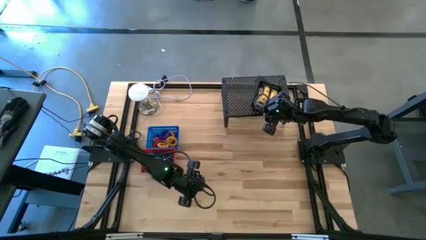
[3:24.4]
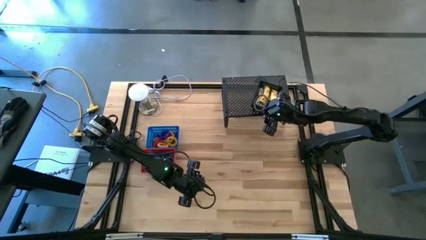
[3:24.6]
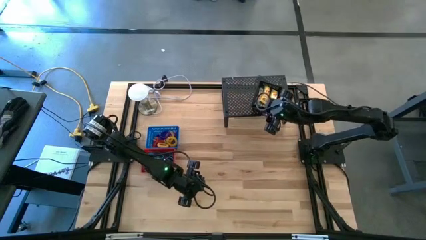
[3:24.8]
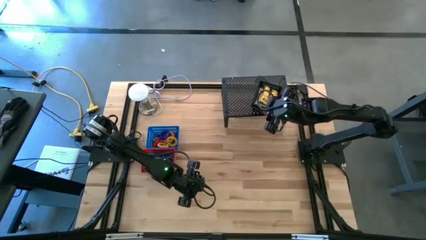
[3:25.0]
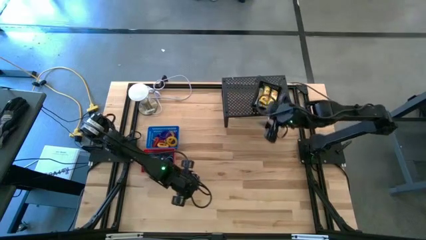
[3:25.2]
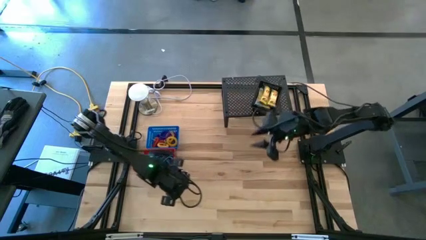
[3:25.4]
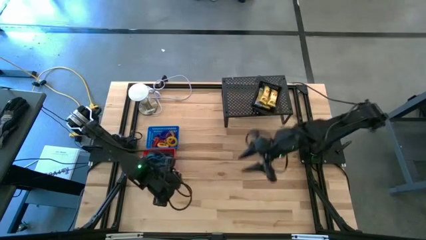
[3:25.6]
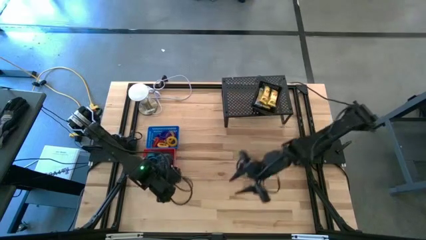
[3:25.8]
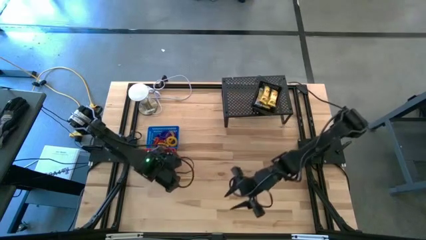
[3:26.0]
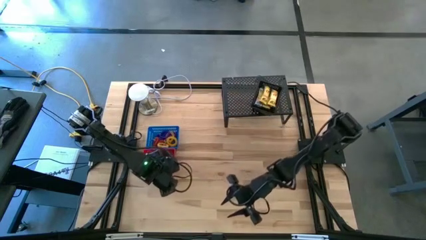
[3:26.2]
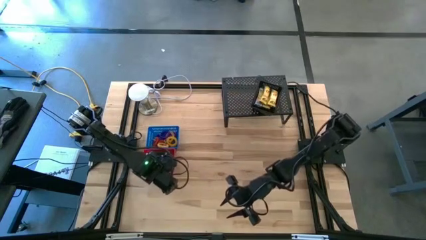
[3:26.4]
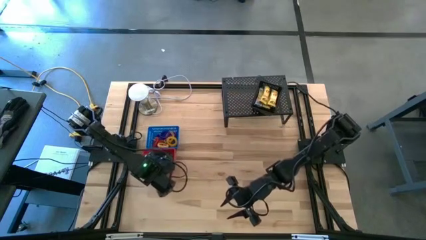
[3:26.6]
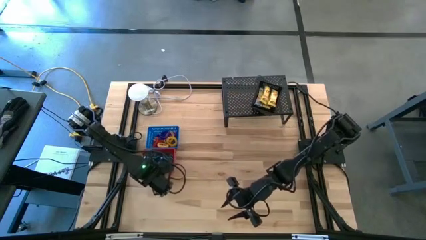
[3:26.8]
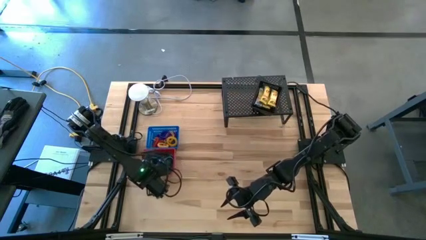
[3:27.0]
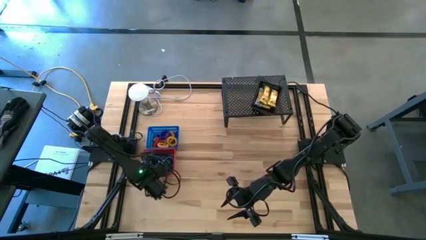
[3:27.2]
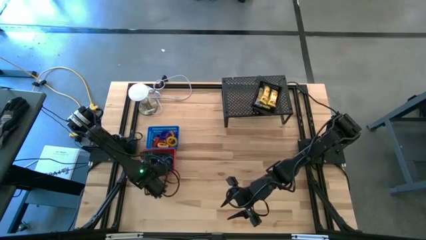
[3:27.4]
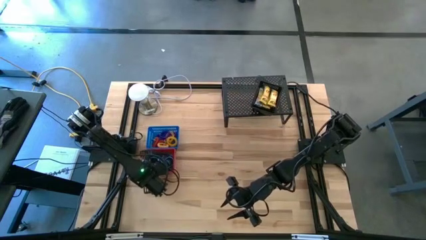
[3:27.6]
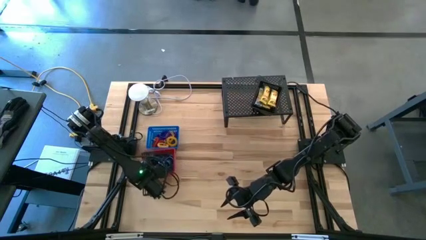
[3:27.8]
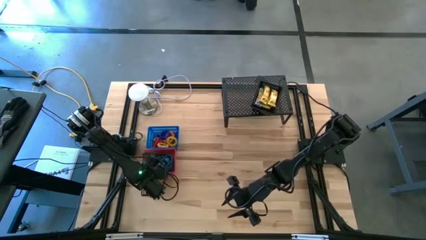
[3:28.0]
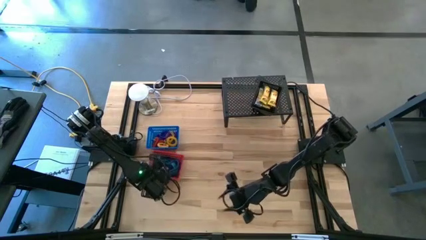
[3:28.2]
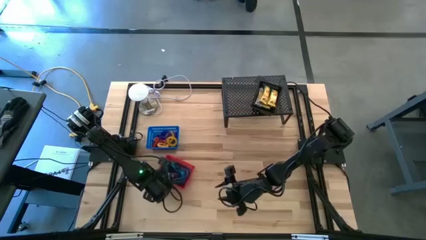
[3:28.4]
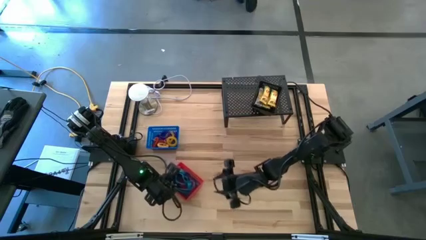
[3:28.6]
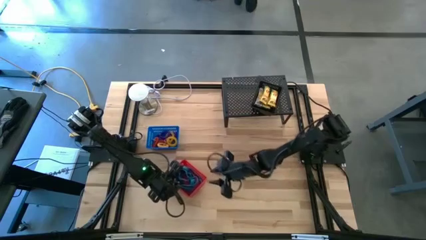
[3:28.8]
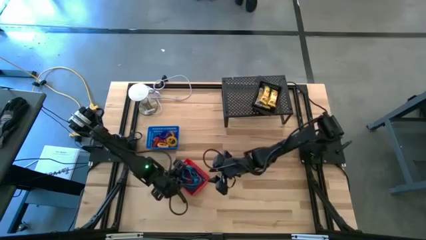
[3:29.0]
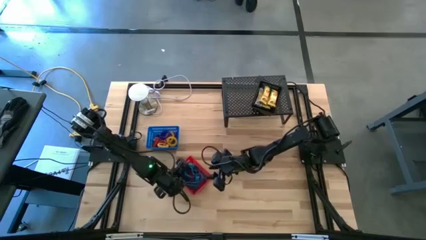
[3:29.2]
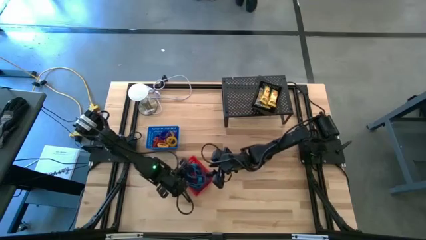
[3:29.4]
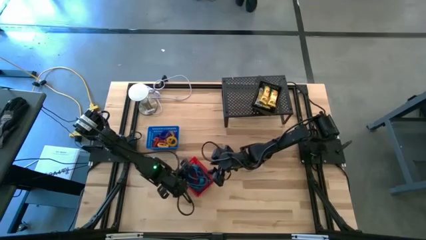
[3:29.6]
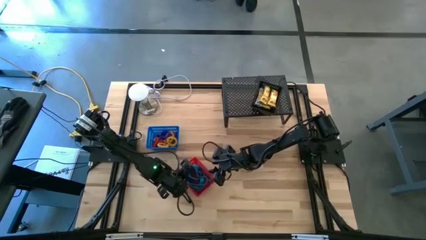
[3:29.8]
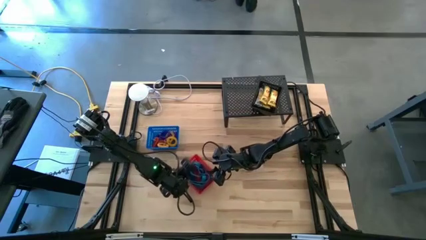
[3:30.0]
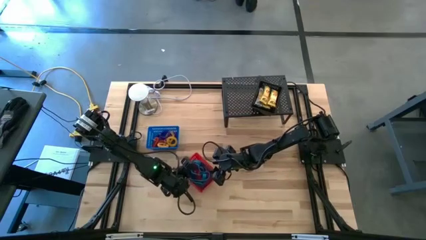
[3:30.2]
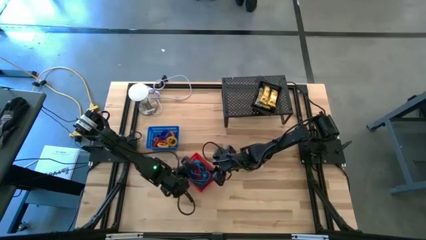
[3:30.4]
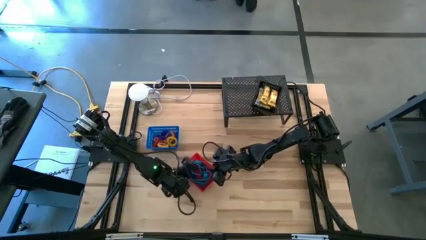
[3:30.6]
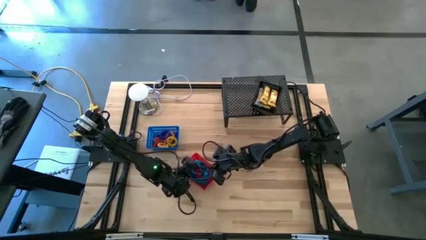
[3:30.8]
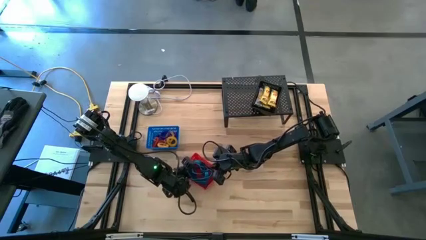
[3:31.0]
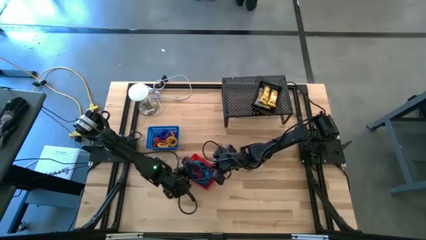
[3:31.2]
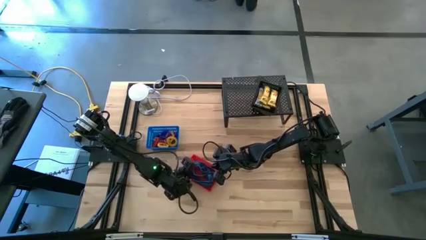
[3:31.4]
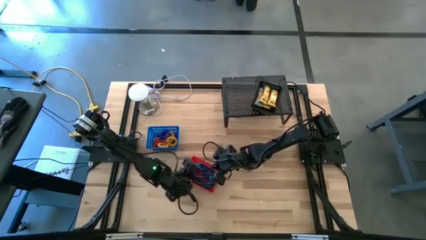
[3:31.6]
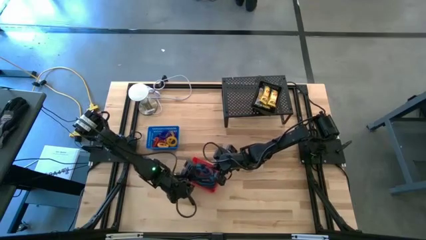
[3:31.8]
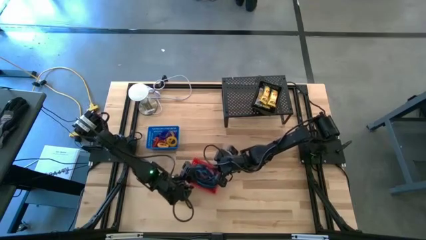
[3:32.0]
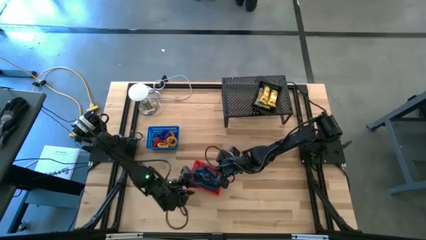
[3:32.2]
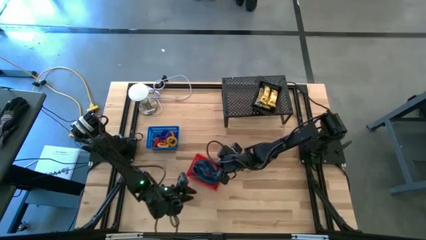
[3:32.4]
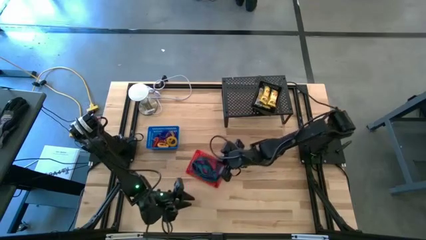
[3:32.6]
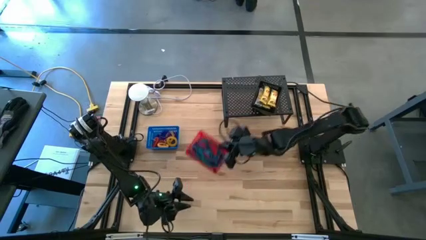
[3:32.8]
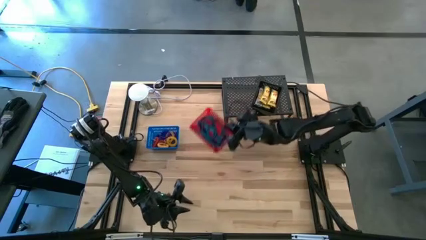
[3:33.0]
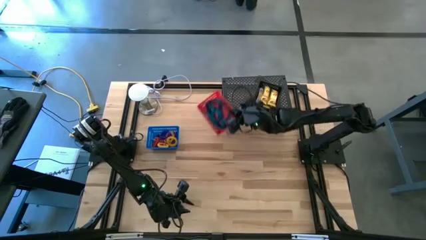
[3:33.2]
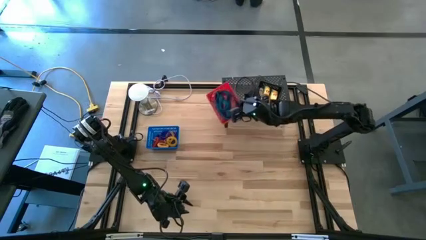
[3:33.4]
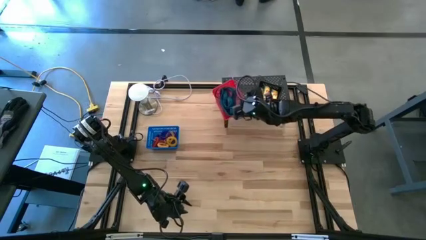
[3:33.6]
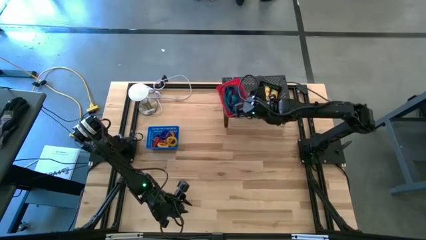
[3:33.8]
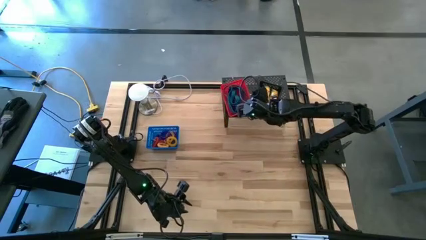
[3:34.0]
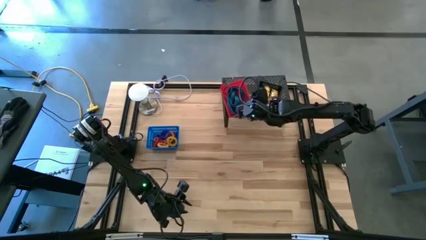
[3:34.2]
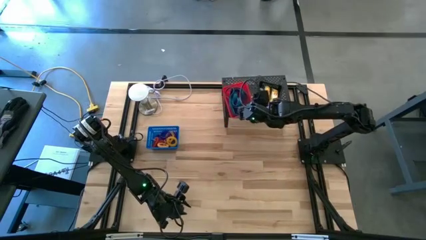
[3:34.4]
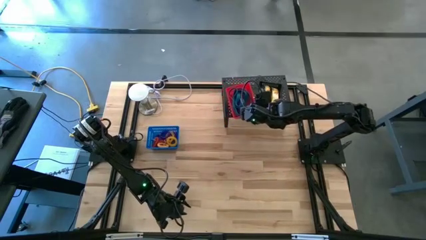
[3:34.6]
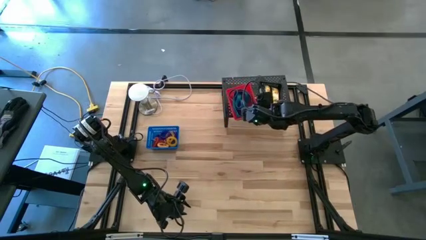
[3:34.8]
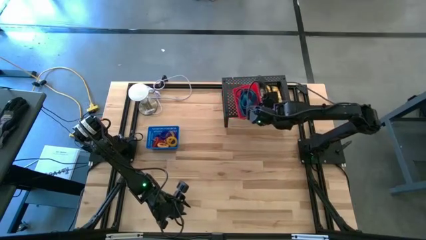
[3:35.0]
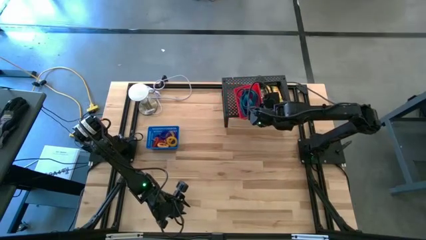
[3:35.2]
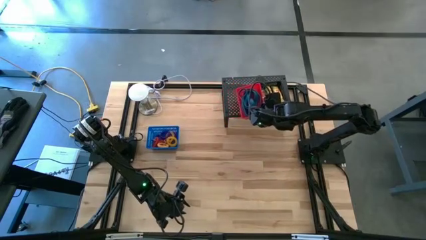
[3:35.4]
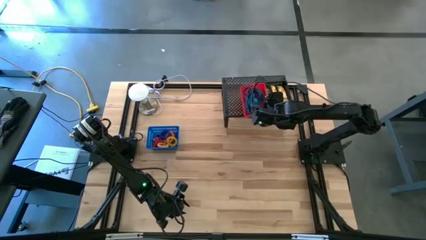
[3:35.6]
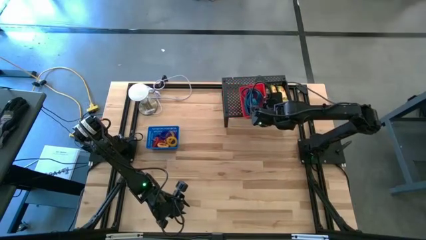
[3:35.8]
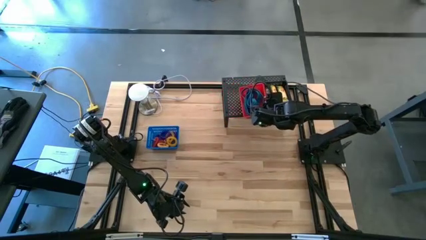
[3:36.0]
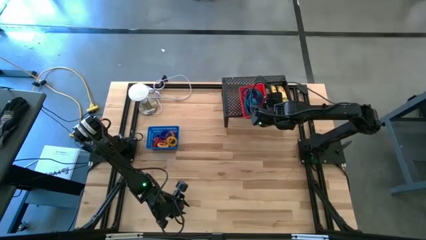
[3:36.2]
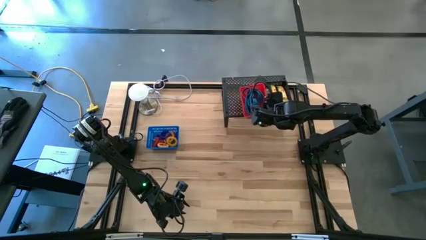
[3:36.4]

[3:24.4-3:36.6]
Task: Pick & Place Office Desk Supplies
Put the red bin filled with rubber bands on the shelf

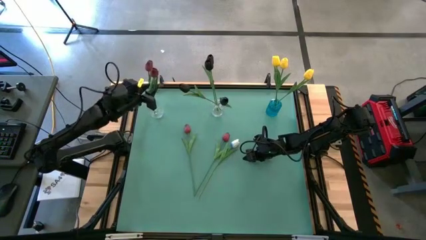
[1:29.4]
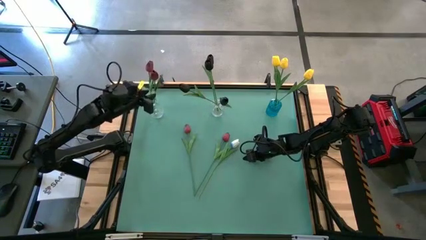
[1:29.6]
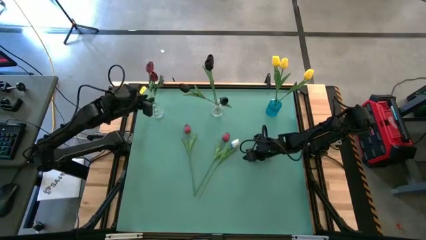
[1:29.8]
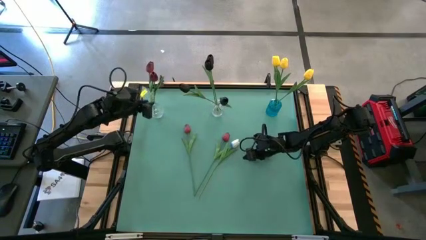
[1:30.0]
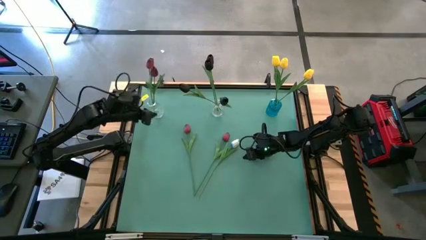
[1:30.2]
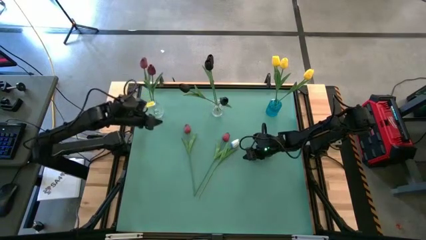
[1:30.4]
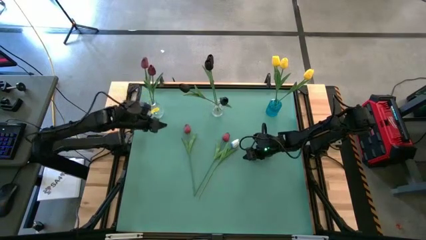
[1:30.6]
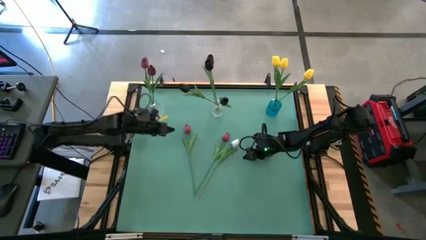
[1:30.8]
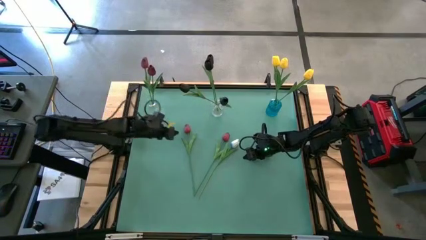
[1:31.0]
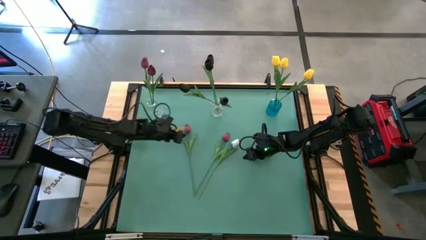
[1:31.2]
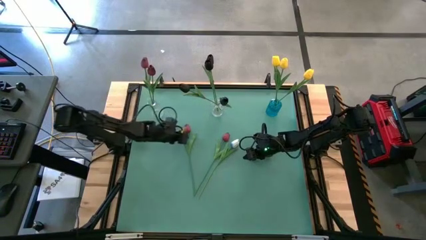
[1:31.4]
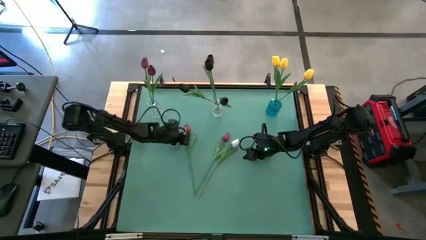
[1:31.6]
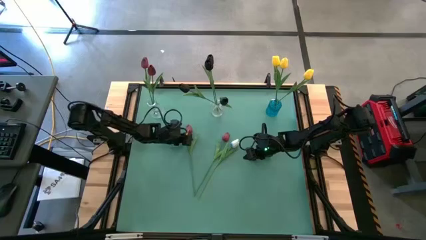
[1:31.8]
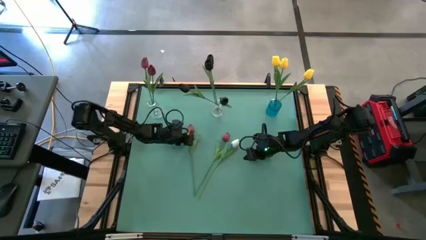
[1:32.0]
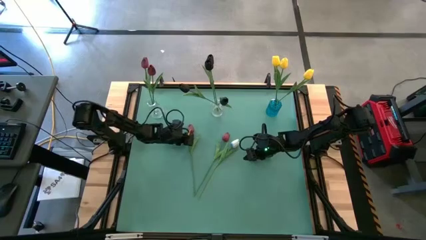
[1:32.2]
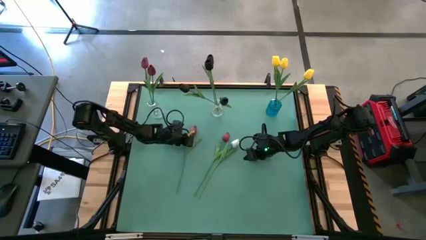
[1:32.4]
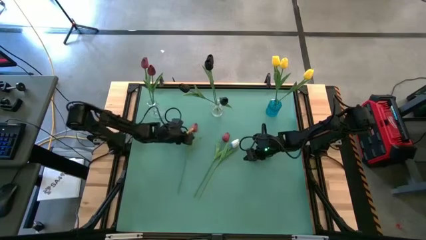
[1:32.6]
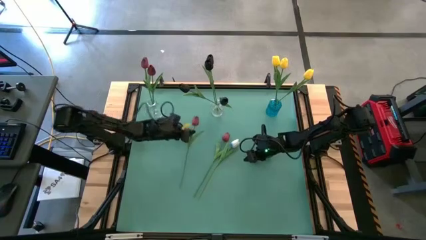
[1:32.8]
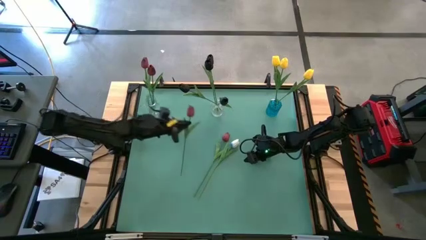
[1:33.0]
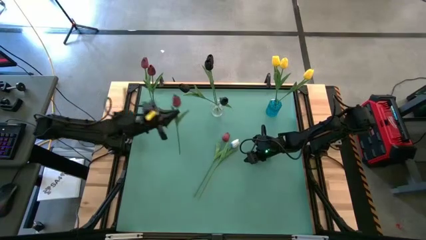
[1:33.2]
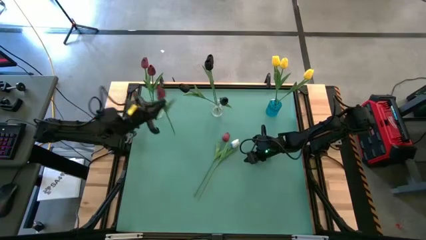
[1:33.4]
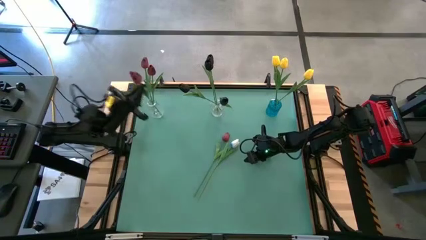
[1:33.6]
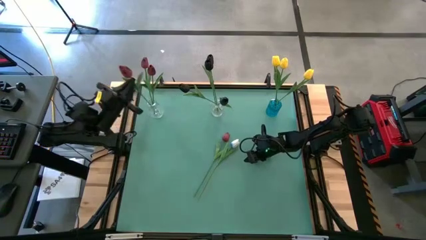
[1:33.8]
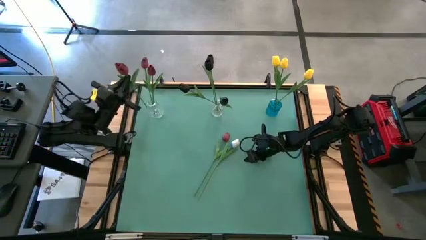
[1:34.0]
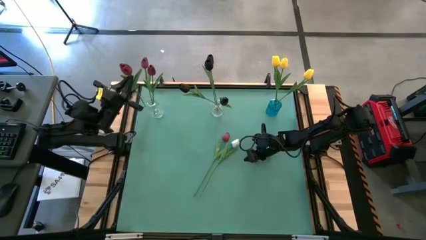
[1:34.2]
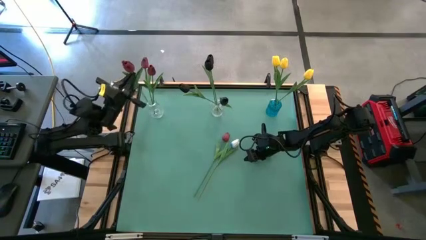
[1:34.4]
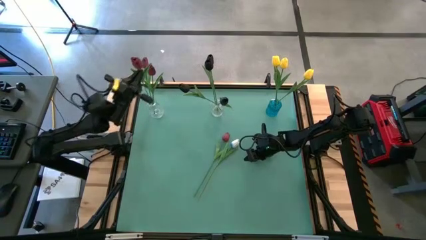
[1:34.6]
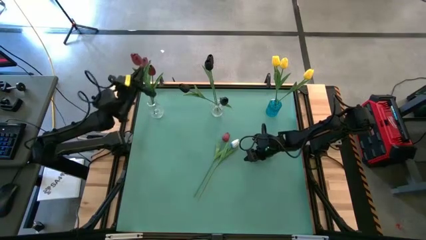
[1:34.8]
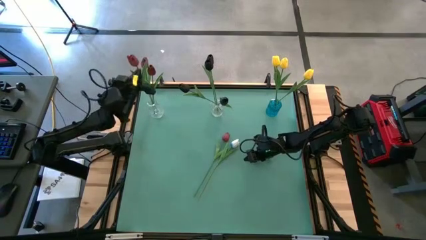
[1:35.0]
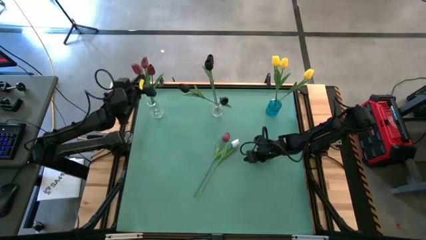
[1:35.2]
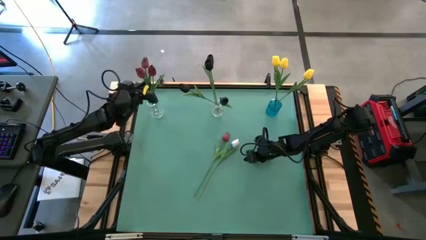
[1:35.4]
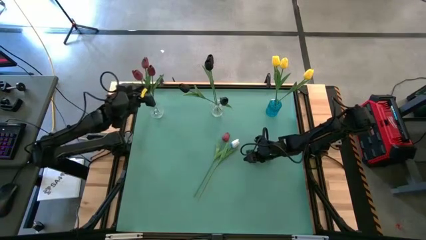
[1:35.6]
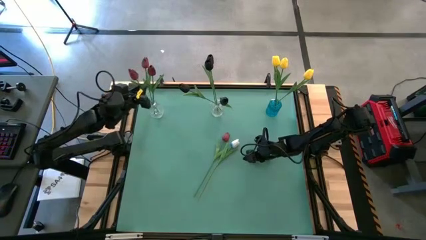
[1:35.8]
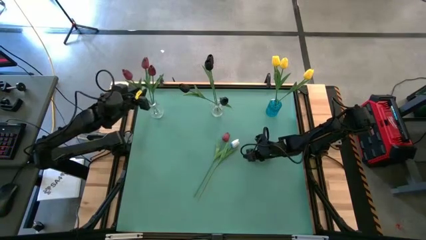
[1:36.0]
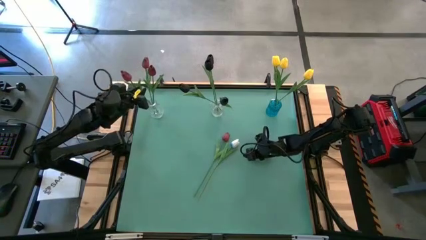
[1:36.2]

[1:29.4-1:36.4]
Task: Sort flowers into vase by color
Put the red tulip into the left transparent vase
